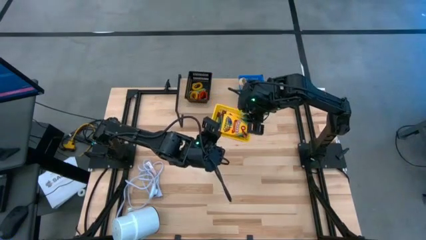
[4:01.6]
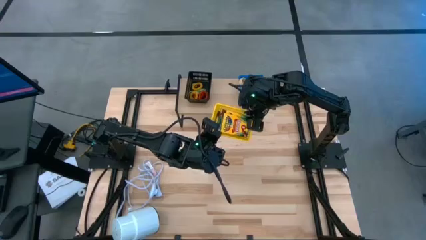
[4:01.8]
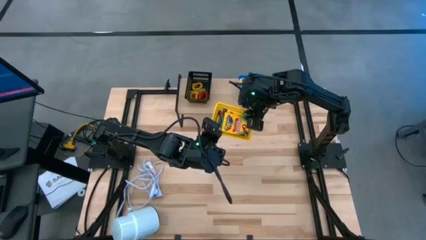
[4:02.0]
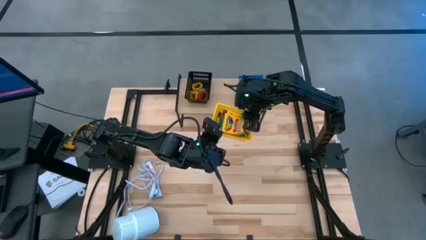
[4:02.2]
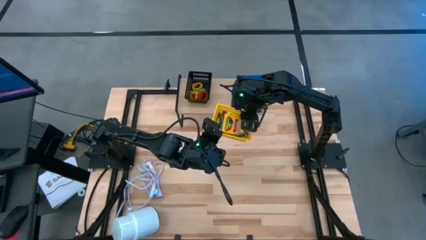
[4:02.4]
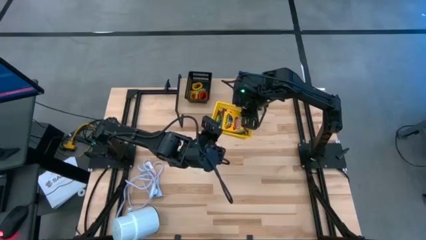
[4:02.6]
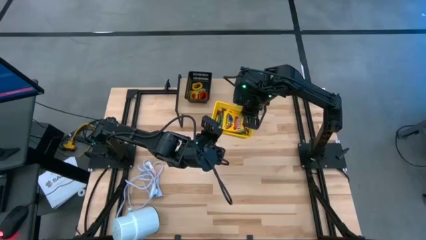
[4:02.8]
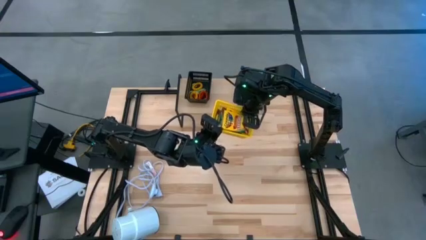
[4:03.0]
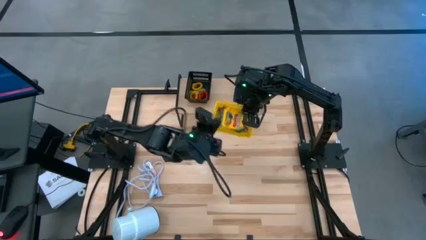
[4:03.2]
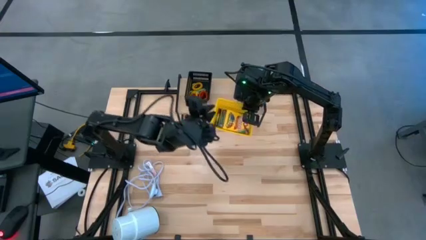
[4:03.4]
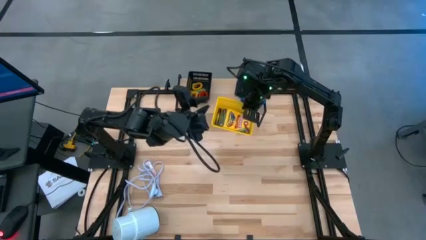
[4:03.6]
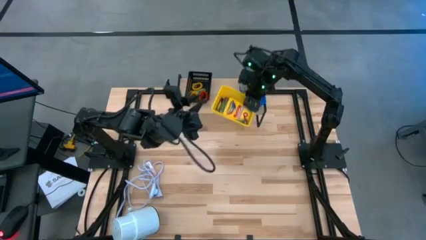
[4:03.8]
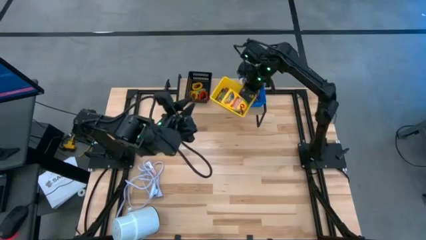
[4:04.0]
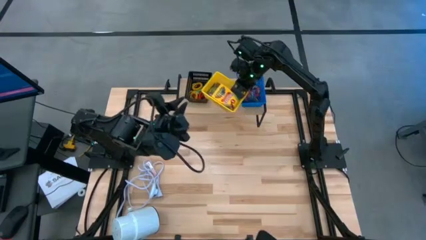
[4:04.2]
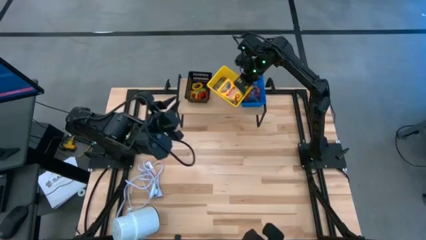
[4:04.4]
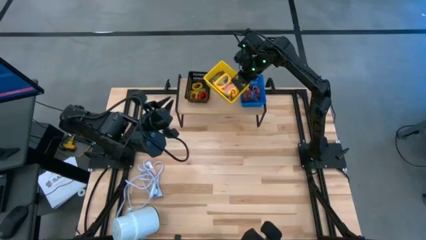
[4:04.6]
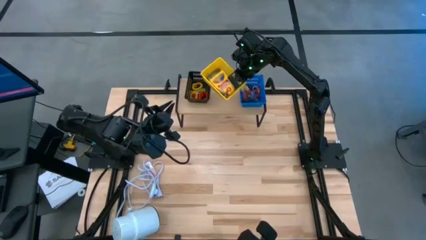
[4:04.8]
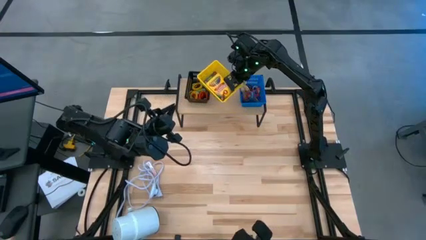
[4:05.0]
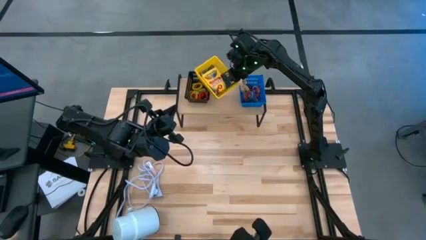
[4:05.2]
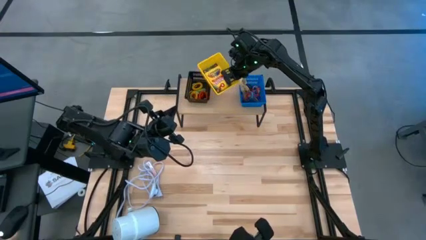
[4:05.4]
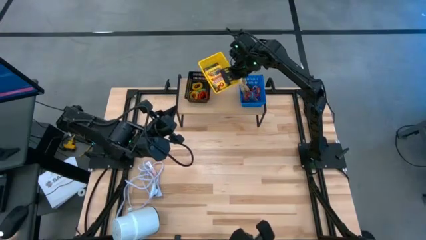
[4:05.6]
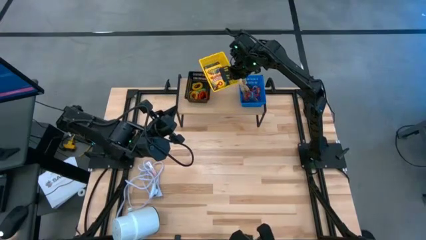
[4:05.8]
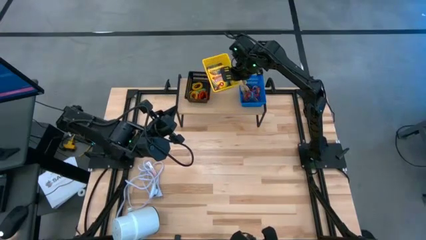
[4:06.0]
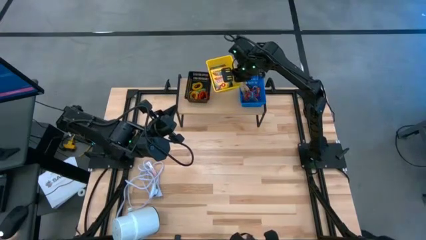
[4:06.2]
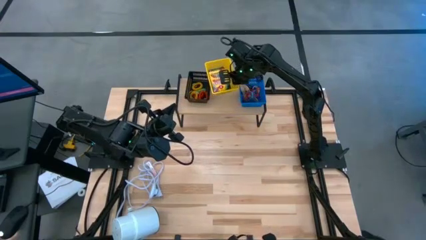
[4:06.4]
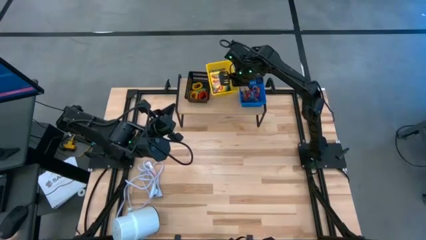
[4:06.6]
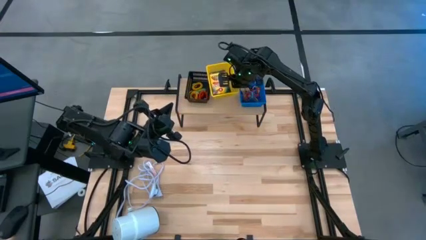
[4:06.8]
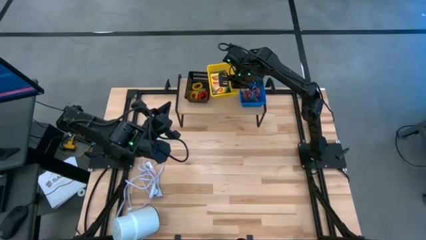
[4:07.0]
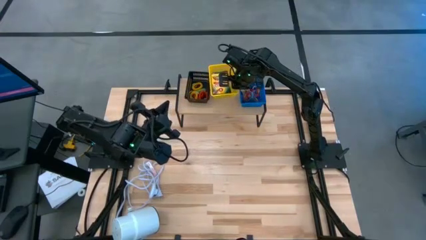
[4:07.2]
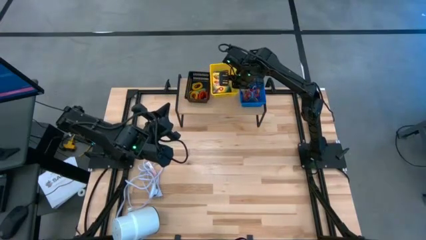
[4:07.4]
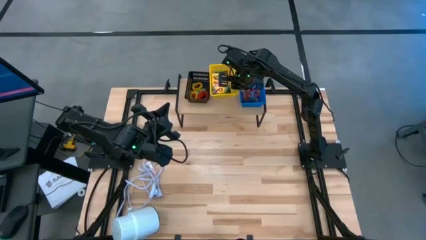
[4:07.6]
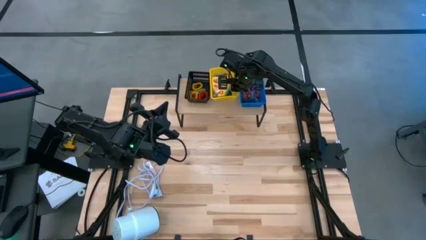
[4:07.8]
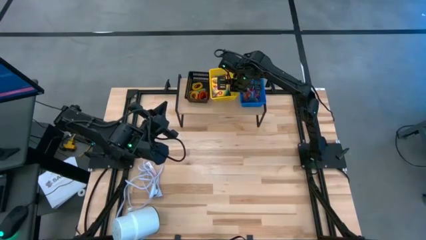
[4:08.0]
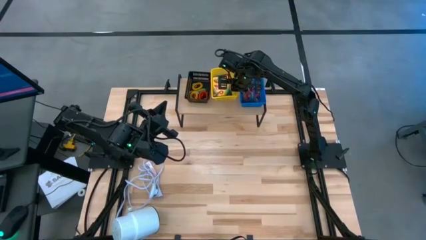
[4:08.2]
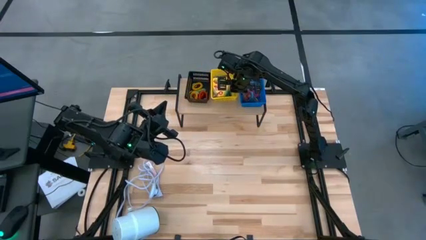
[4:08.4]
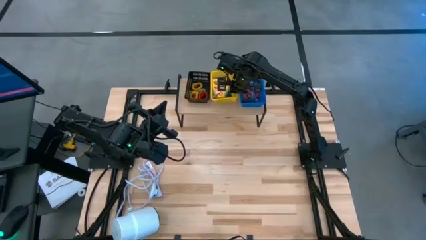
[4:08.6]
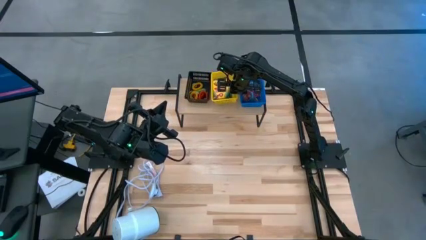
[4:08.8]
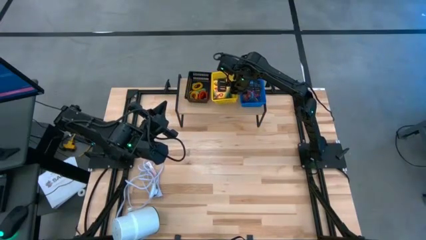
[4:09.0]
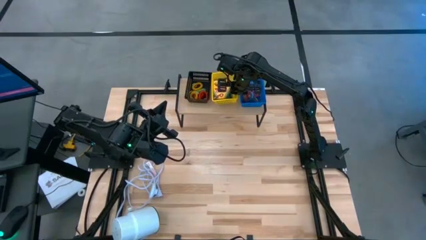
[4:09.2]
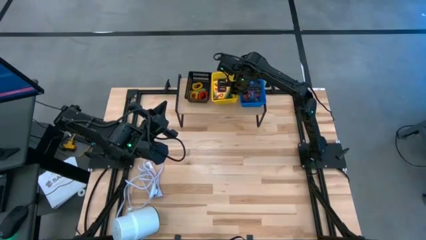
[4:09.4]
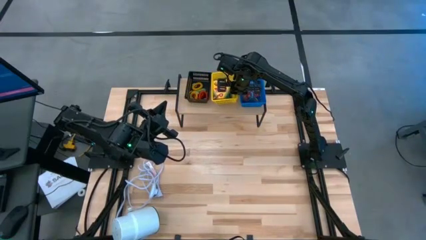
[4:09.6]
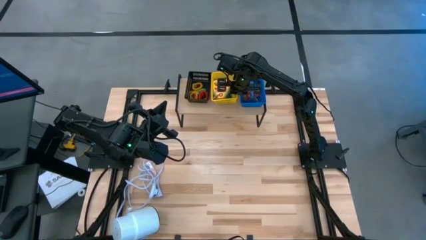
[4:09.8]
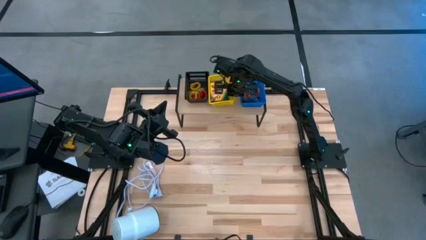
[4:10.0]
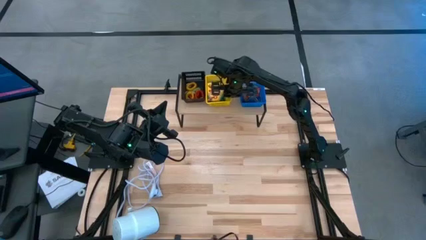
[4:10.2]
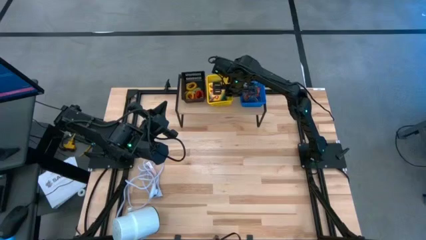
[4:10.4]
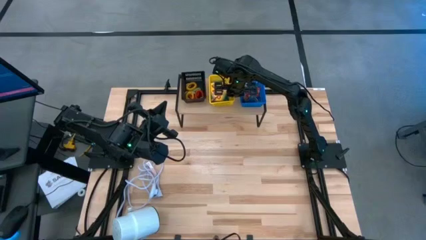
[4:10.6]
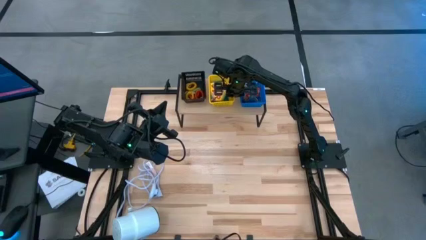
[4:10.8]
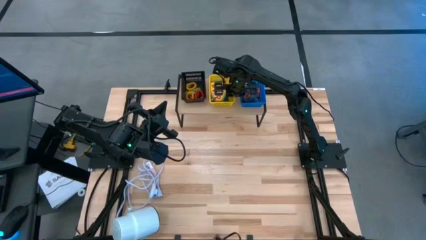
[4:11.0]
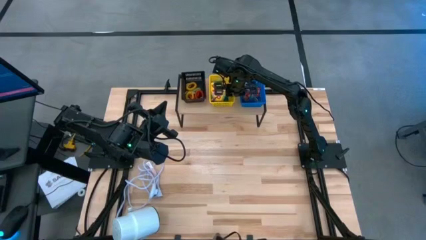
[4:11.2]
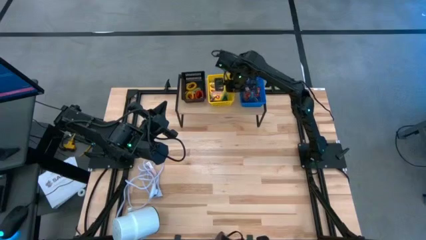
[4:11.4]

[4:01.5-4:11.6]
Task: Pick & Place Office Desk Supplies
Put the yellow bin on top of the shelf

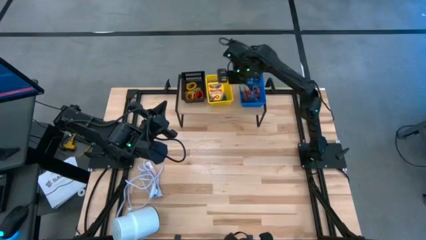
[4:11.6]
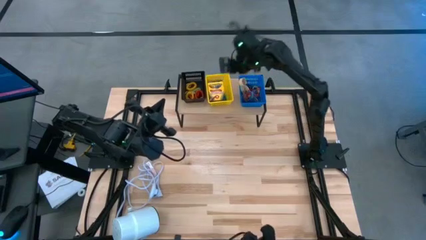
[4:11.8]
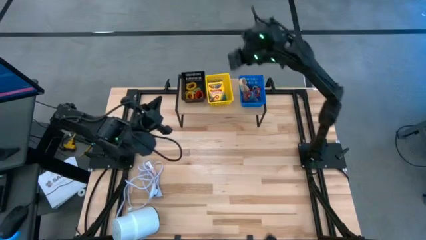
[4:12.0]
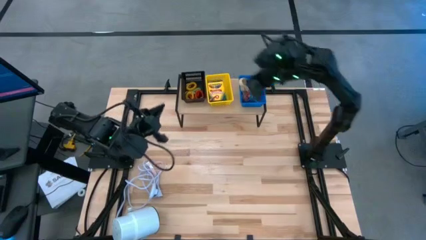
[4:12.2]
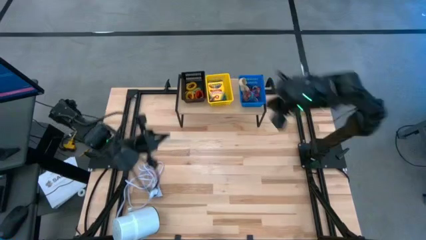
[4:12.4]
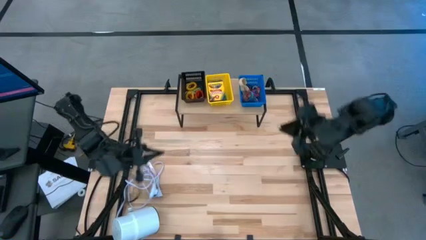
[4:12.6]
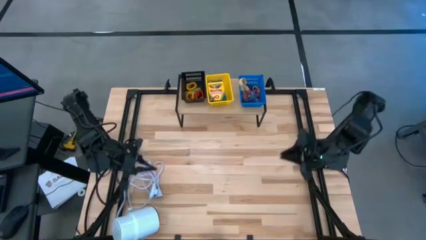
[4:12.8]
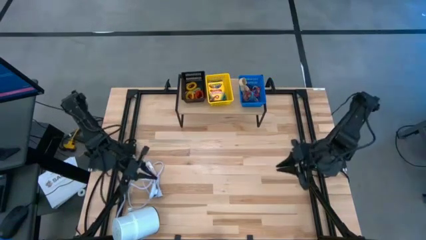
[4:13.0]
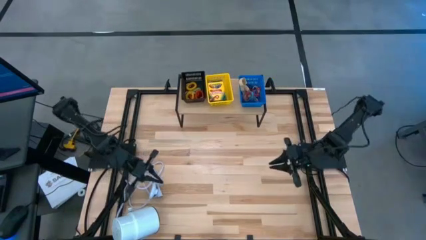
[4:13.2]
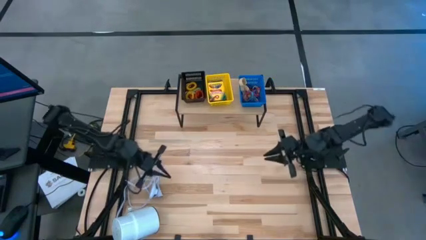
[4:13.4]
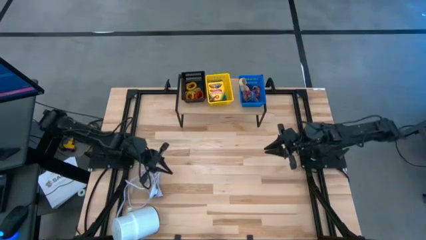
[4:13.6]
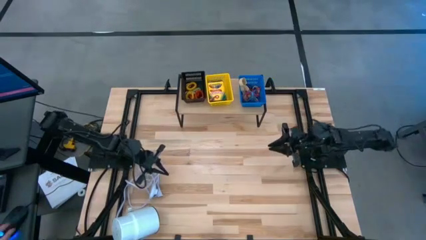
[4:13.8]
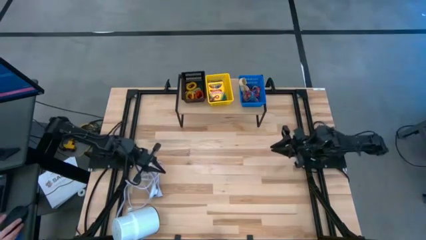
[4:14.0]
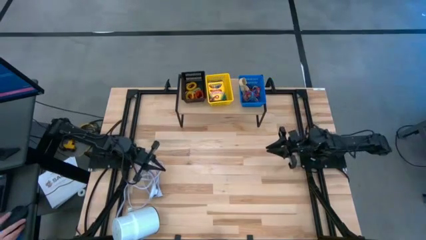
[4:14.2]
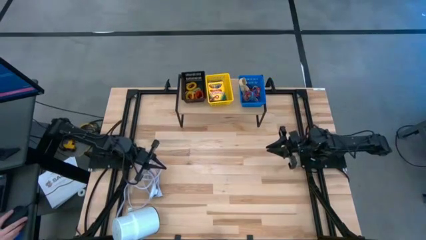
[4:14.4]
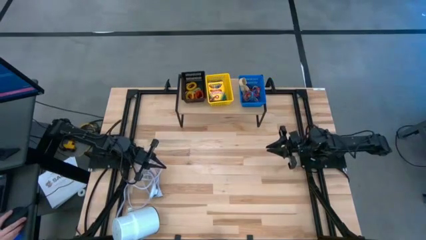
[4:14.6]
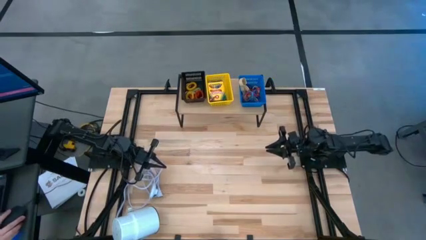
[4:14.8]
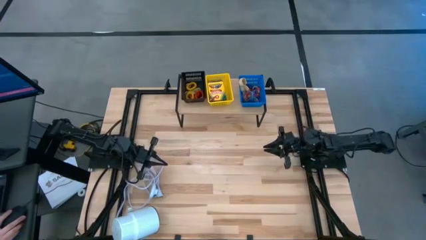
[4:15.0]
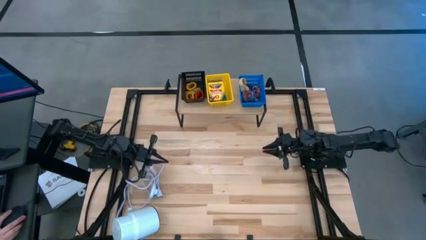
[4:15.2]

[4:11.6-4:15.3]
Return to Home Position

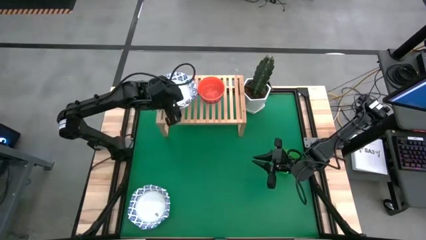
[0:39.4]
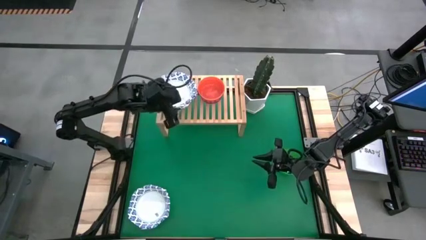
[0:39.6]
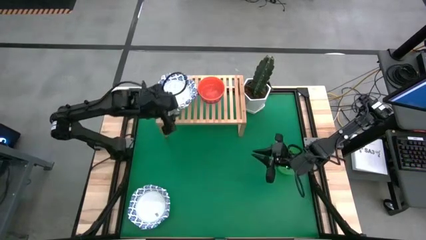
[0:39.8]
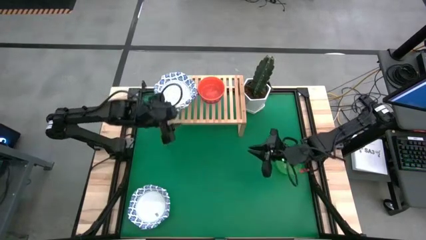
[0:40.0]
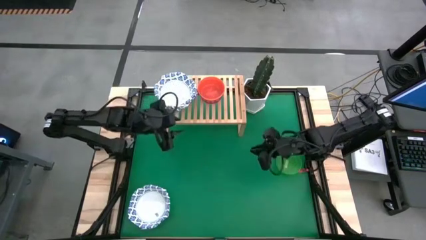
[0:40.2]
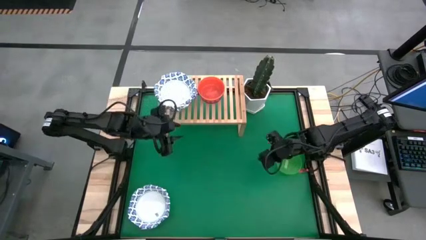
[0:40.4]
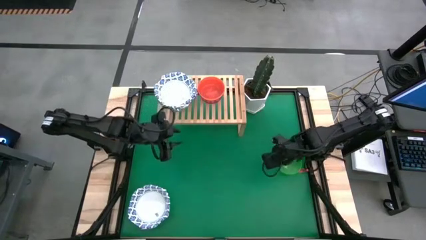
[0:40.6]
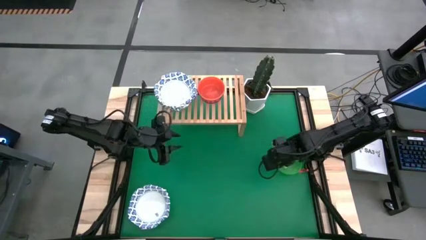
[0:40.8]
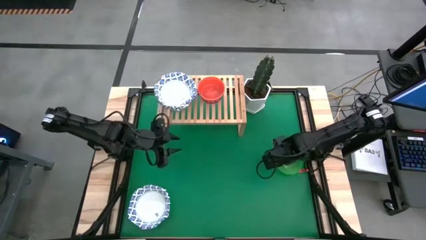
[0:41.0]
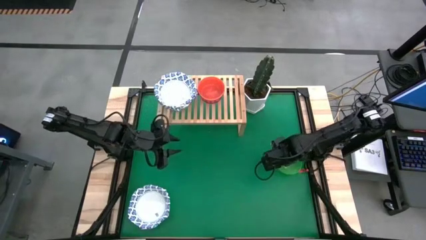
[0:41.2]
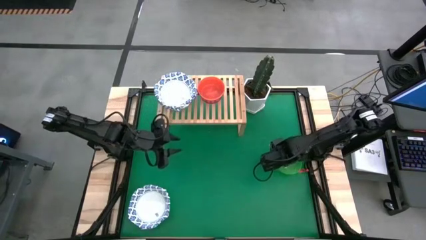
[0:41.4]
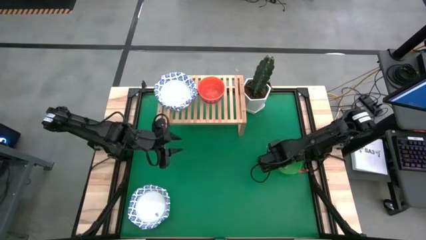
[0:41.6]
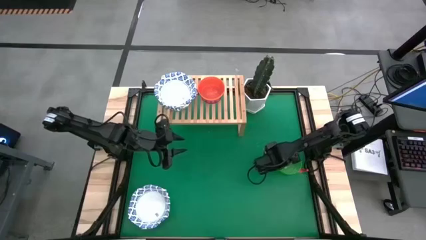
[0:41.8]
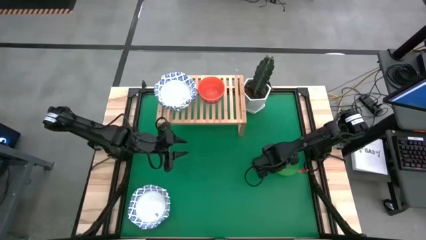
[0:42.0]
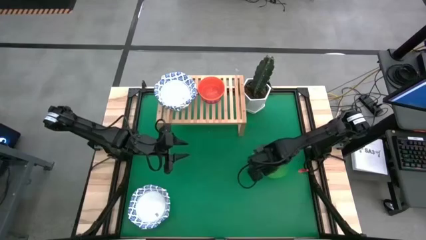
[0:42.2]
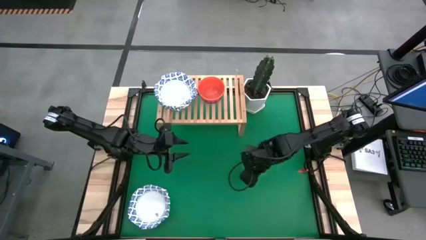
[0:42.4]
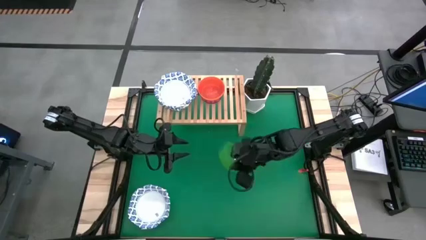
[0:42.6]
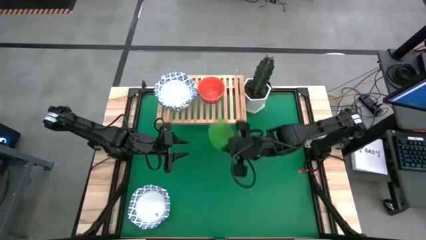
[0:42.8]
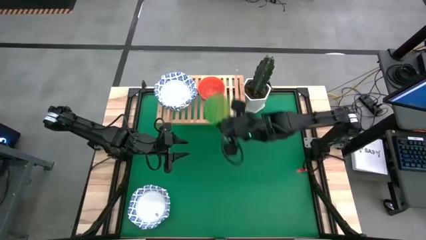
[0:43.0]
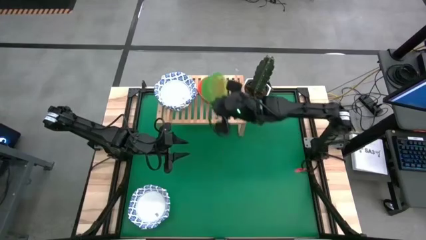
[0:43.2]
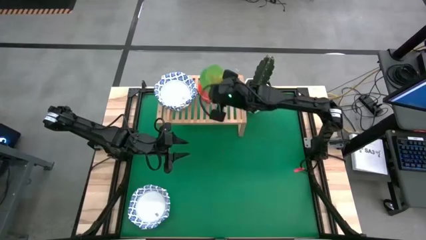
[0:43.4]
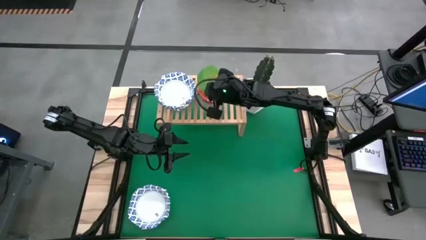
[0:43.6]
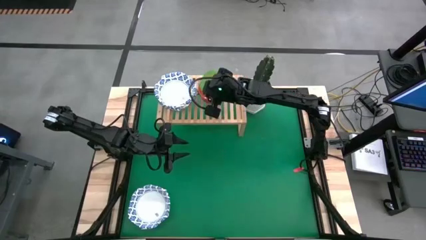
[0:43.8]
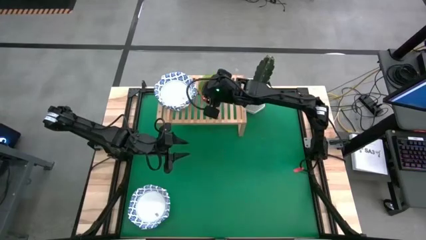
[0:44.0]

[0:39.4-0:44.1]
Task: Place and stack bowls onto a shelf
Stack the green bowl on top of the orange bowl on the shelf
